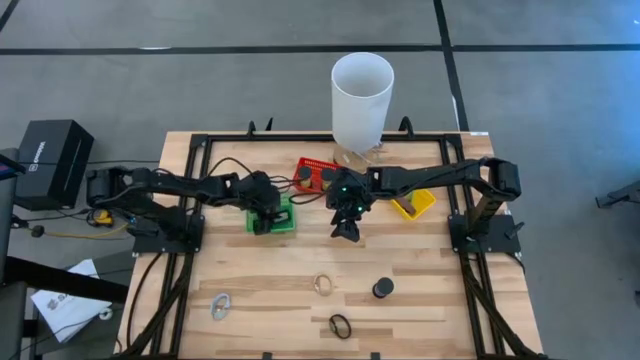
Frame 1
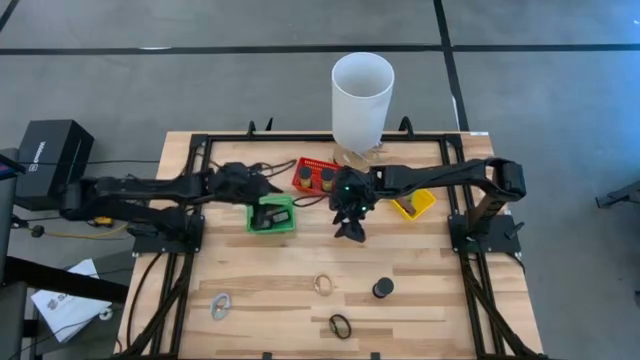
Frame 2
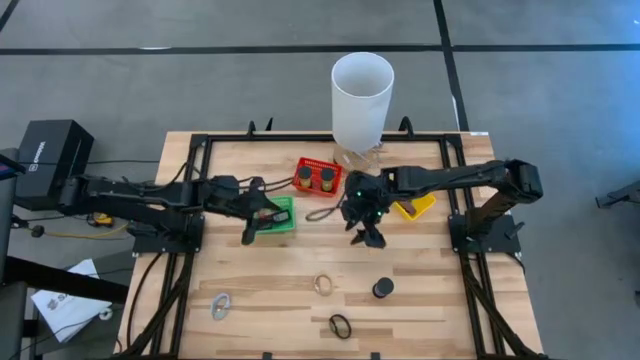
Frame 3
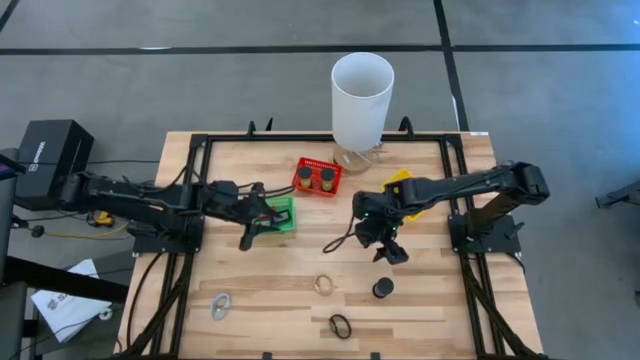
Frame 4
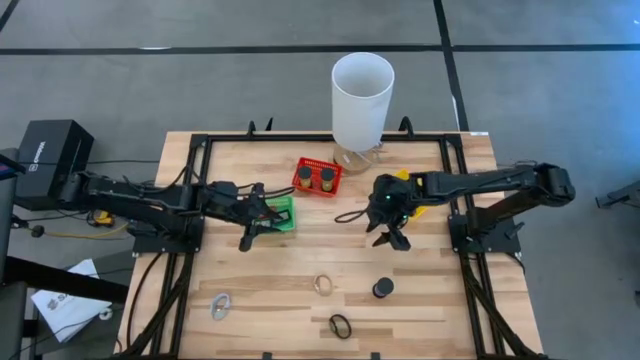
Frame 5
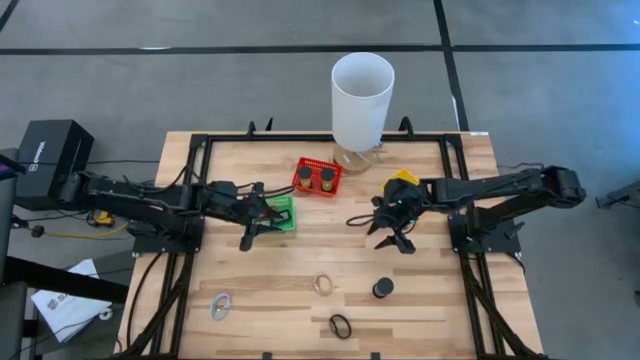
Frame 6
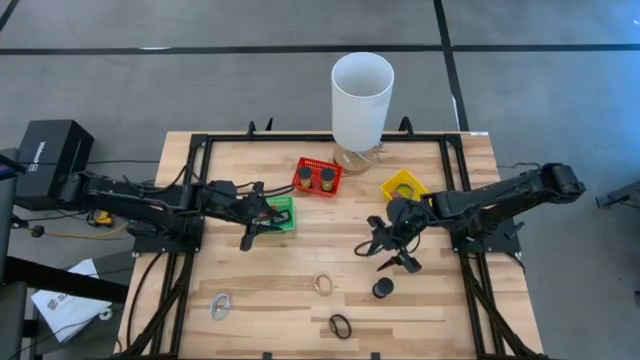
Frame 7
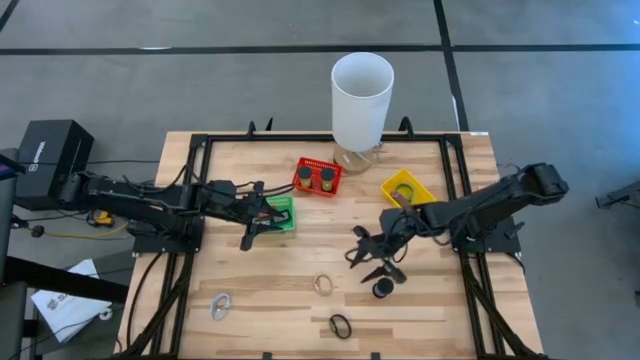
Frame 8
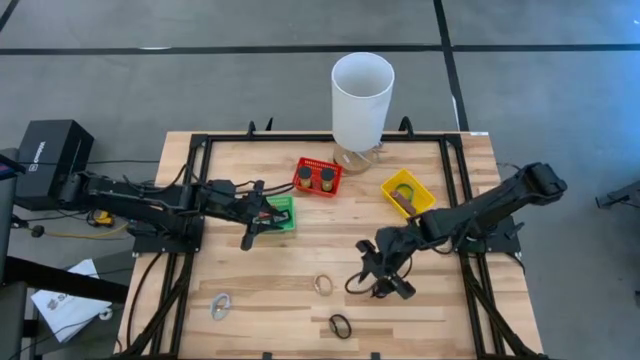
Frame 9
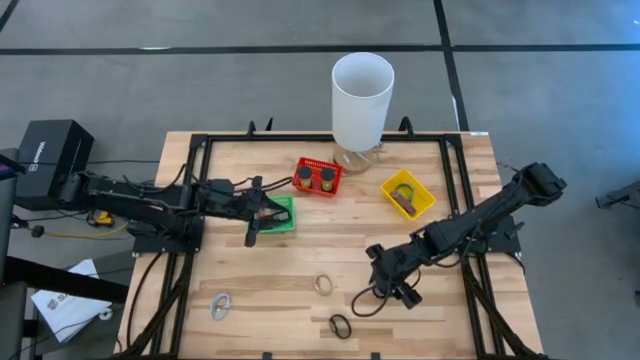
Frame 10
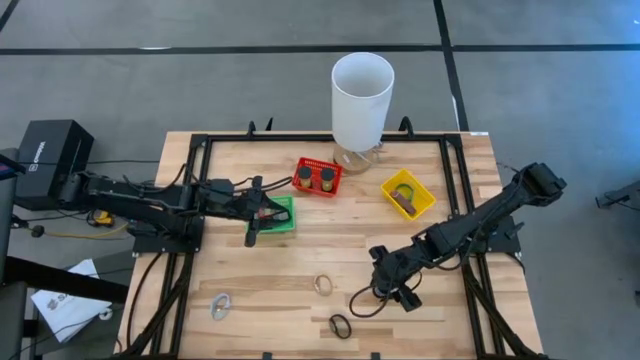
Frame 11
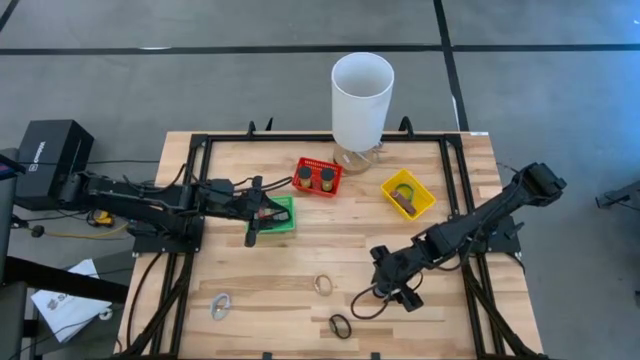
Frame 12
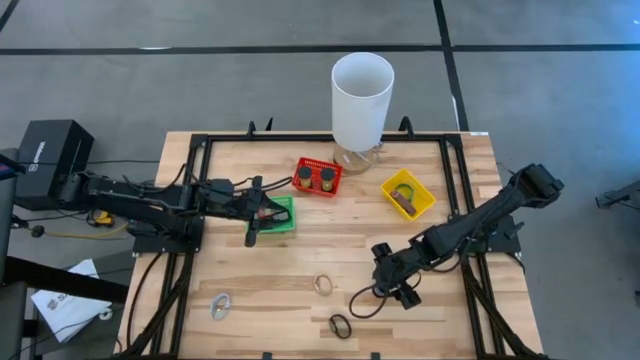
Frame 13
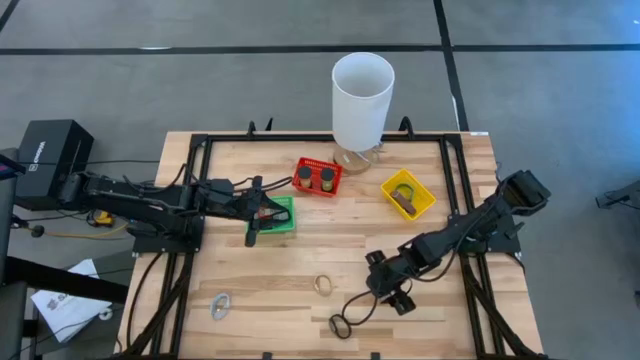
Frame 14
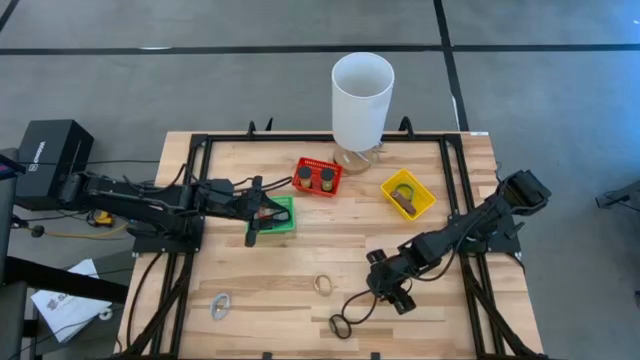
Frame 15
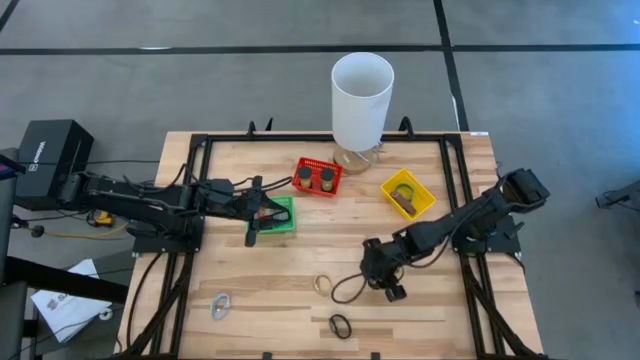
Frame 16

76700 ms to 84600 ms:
Task: Pick & Place Office items
Put the black hourglass into the red bin

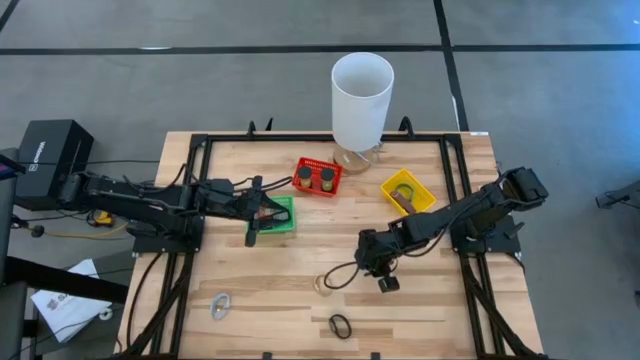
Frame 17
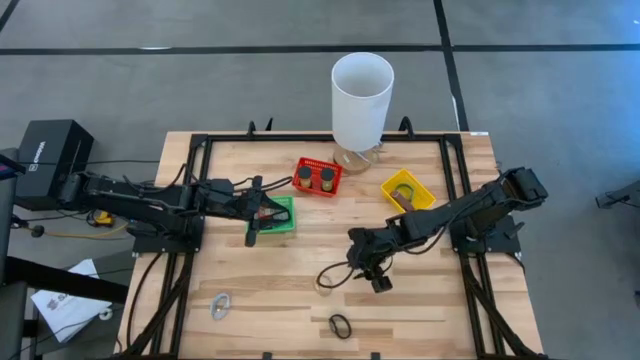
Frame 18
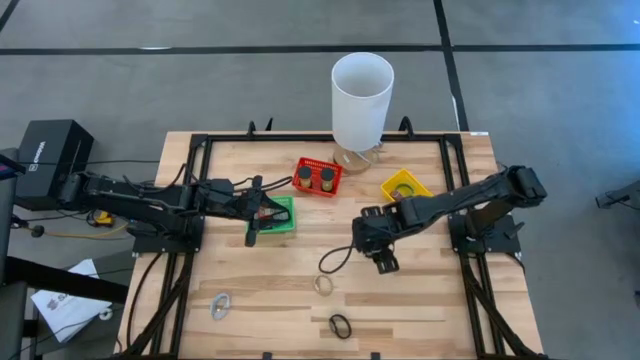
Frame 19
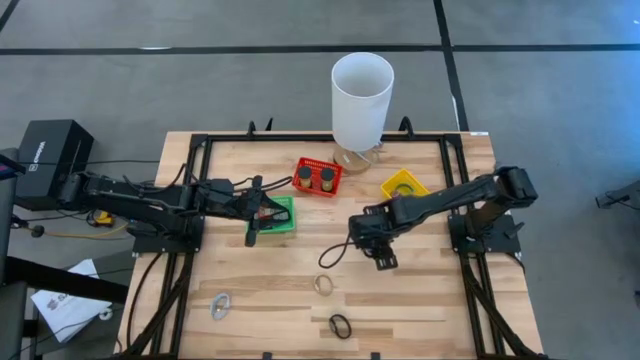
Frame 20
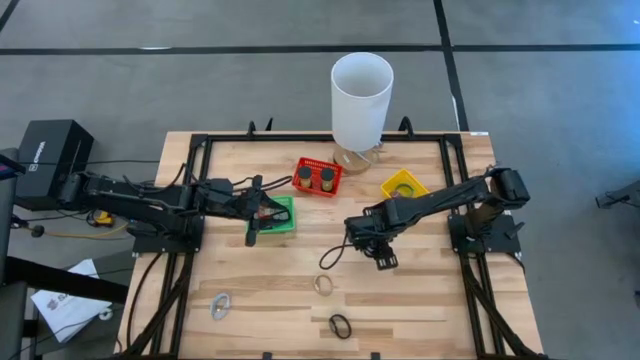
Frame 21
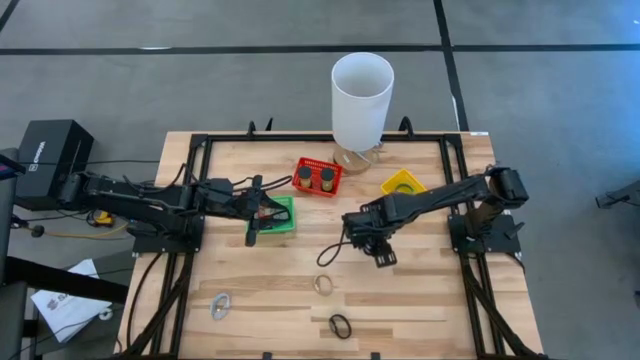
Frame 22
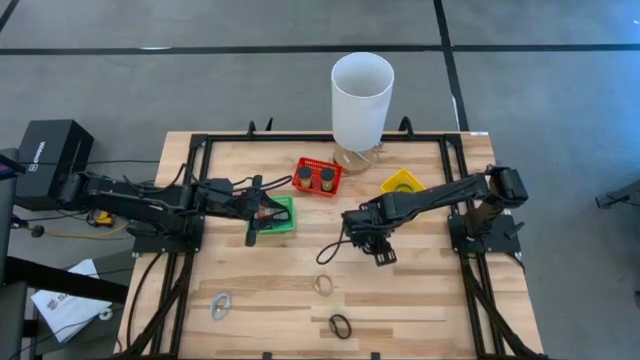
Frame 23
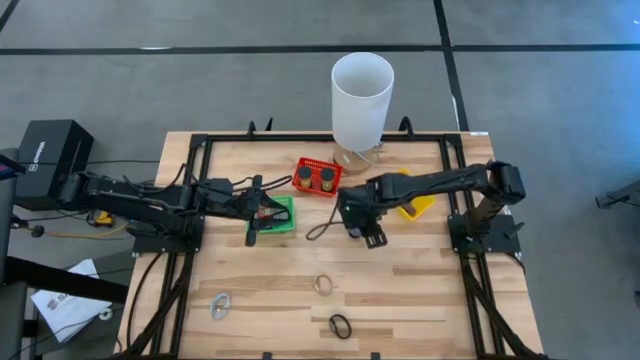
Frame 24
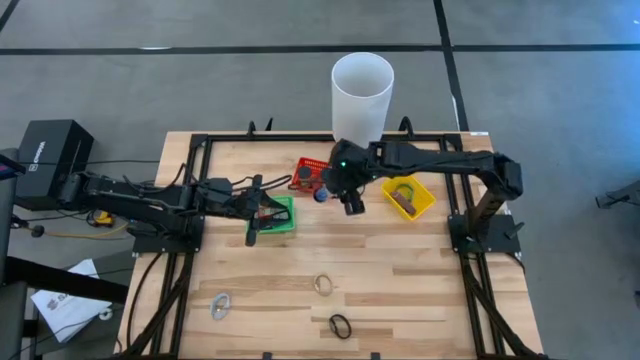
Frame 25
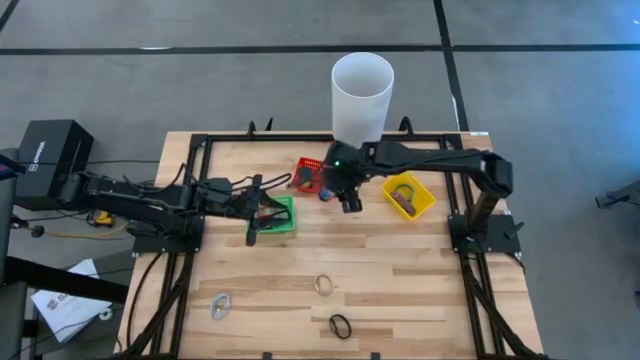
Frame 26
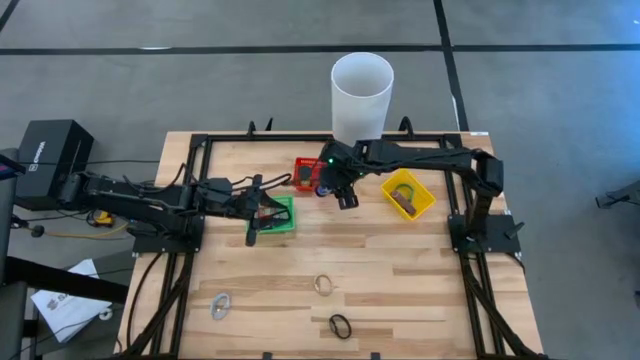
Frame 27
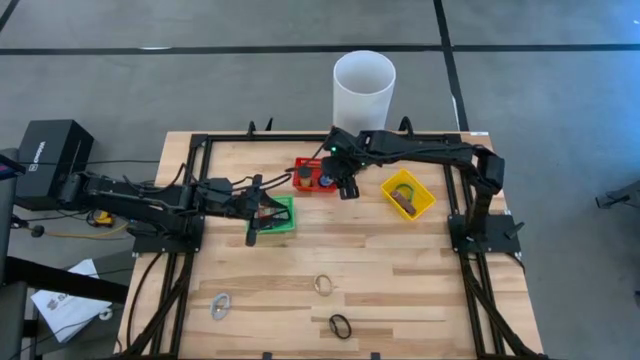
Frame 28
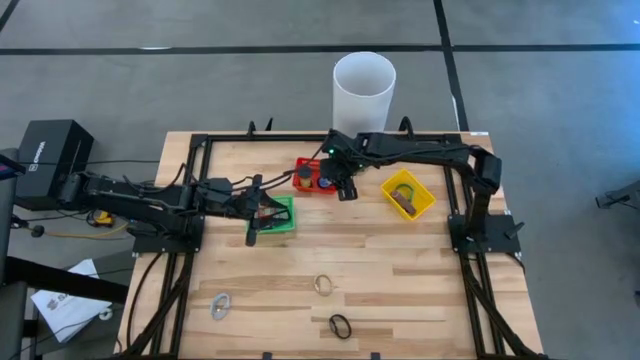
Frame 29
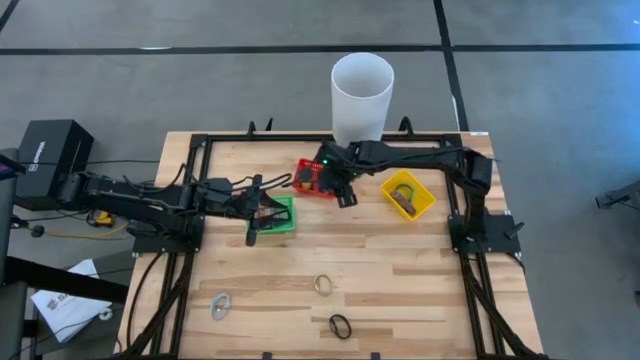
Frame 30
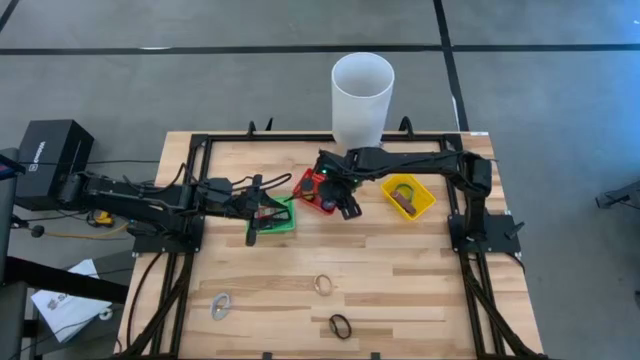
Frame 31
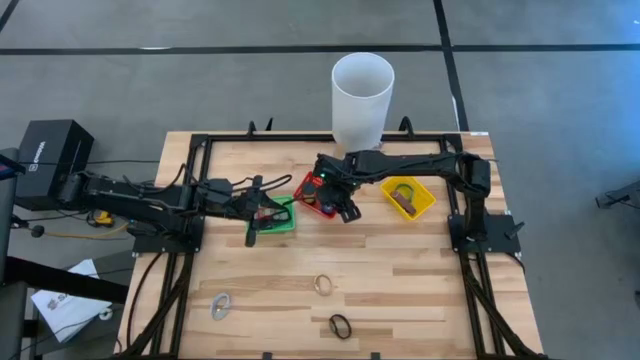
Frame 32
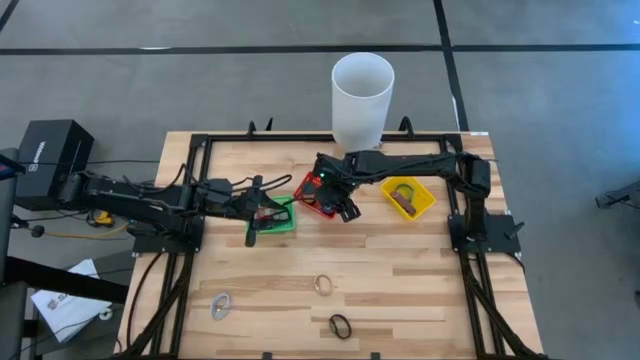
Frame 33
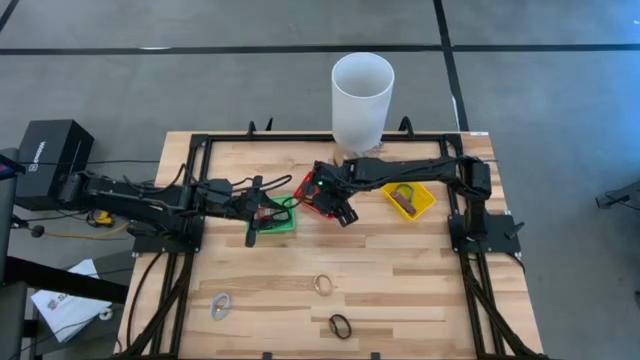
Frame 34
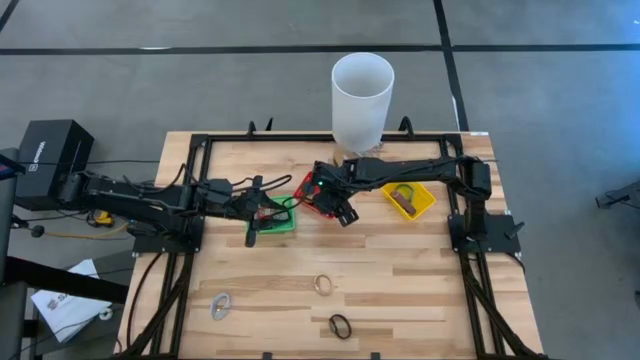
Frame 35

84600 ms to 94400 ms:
Put the black hourglass into the red bin

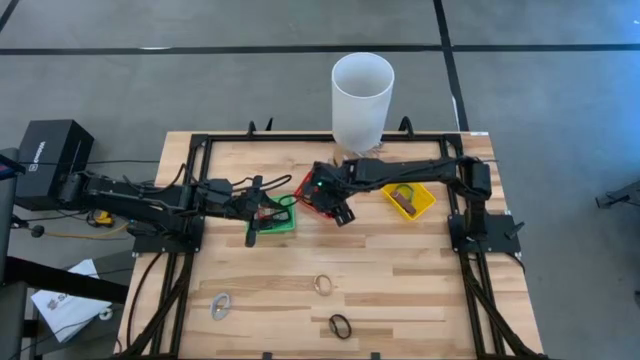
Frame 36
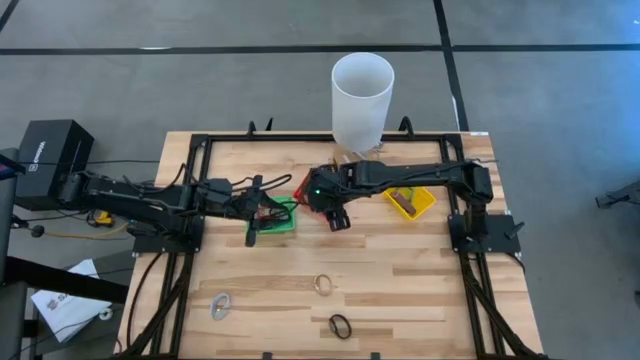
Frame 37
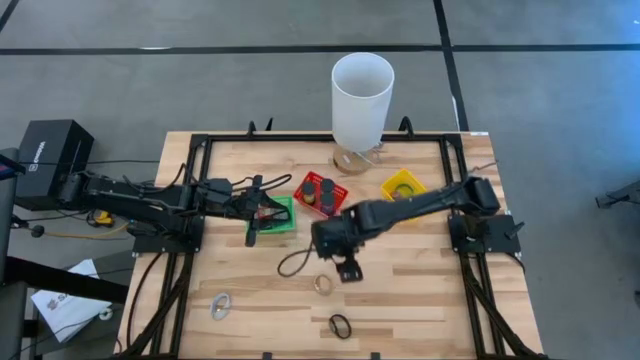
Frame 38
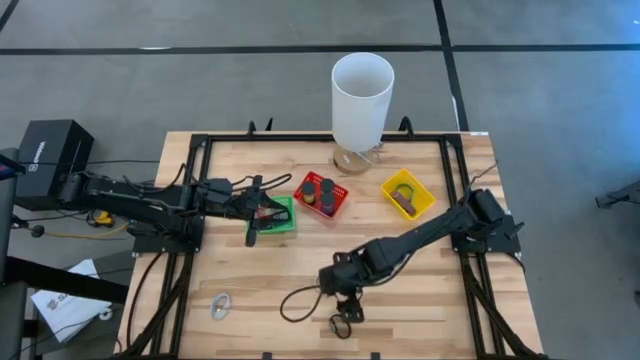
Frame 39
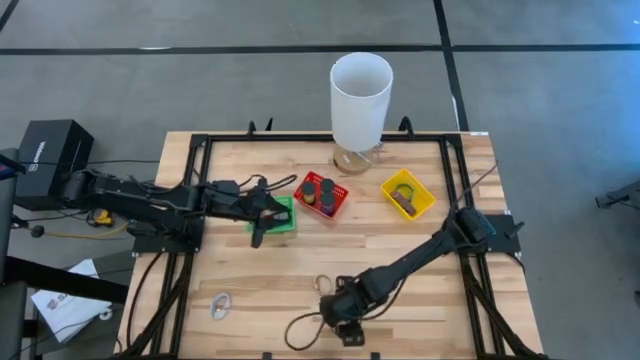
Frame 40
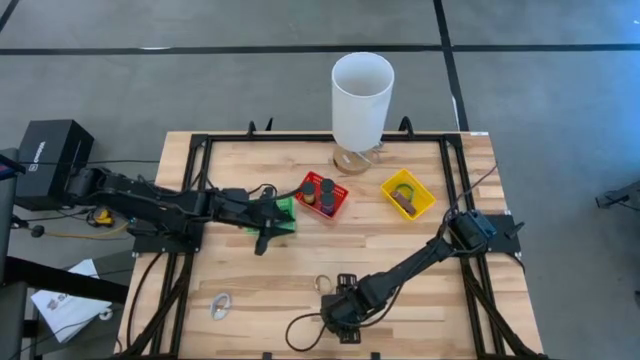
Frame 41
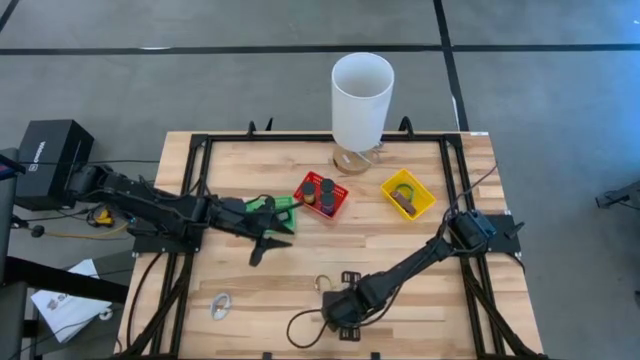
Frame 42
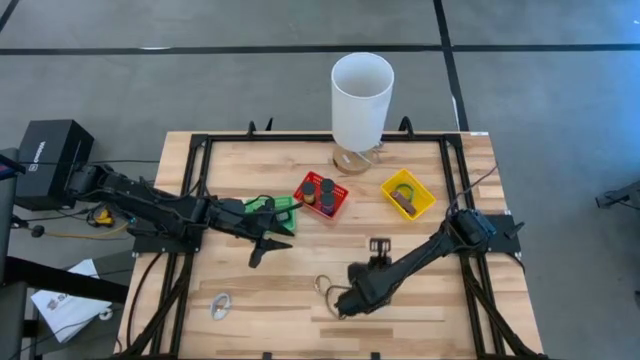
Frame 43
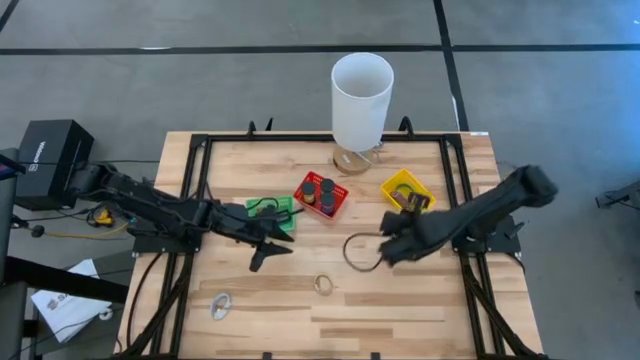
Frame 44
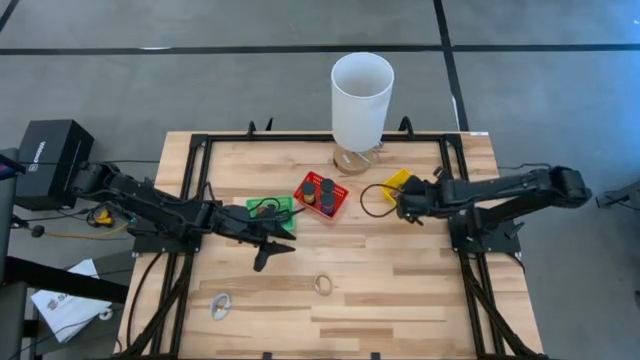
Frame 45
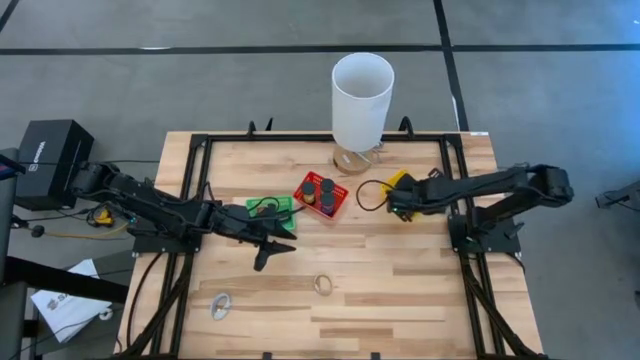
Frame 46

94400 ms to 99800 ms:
Put the black watch into the yellow bin
